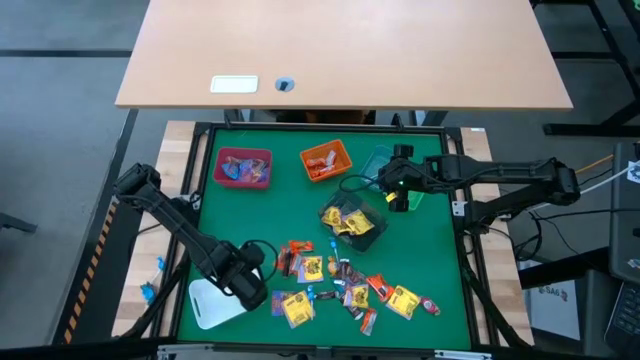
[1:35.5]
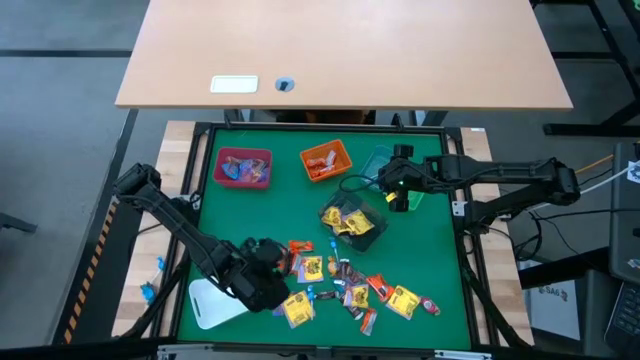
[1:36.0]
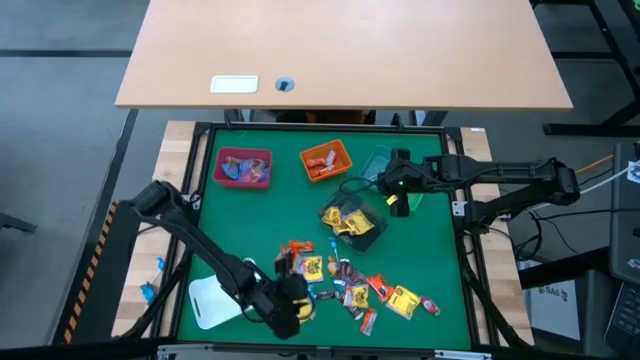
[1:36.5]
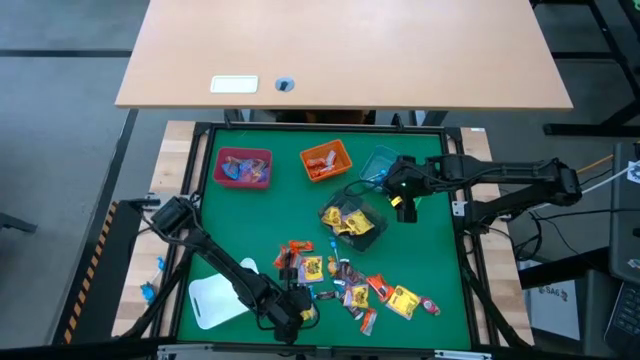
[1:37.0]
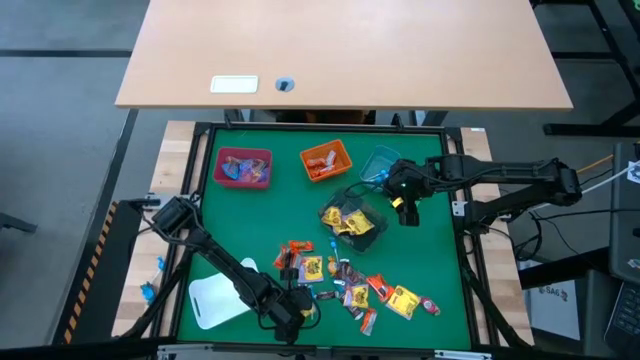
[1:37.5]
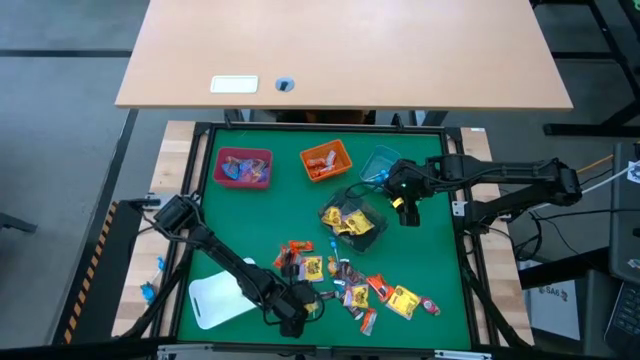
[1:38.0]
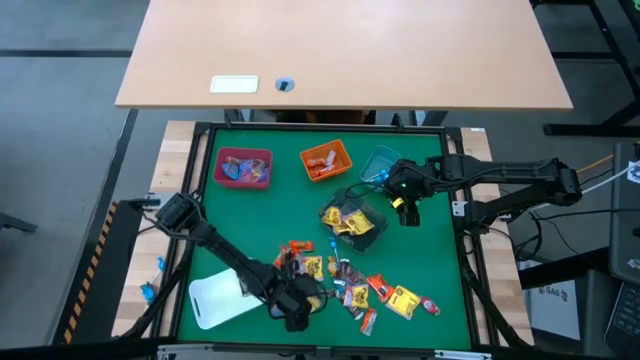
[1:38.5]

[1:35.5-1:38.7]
Task: Sort candy
Put the yellow candy pack into the black bin

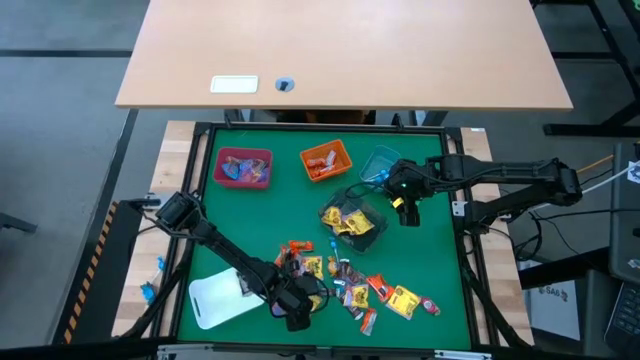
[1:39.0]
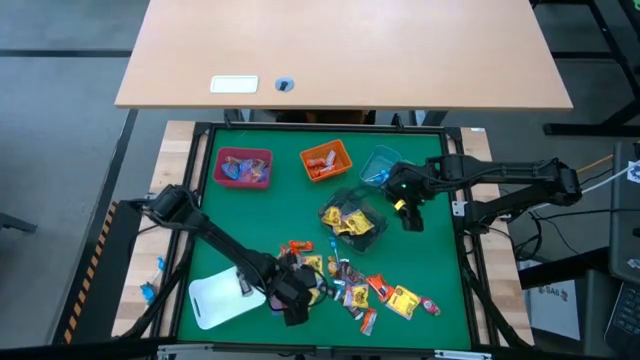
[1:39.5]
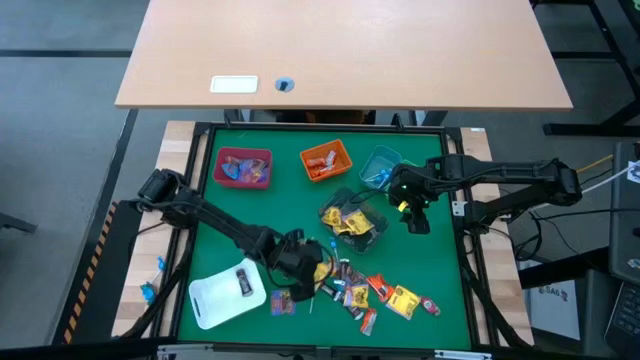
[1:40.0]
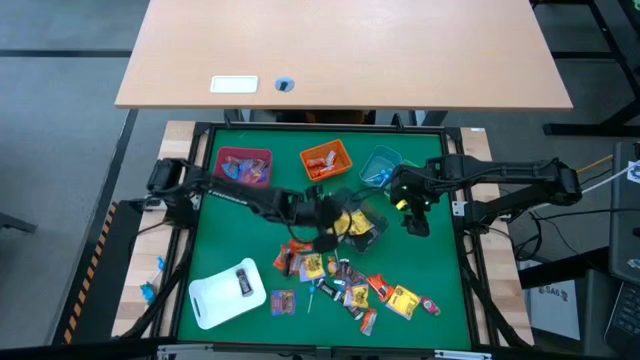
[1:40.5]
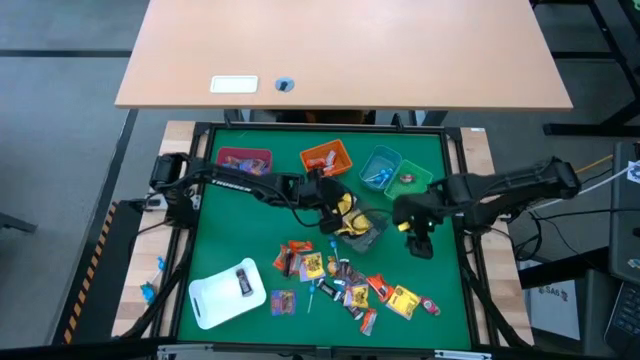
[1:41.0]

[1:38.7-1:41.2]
Put the yellow candy pack into the black bin

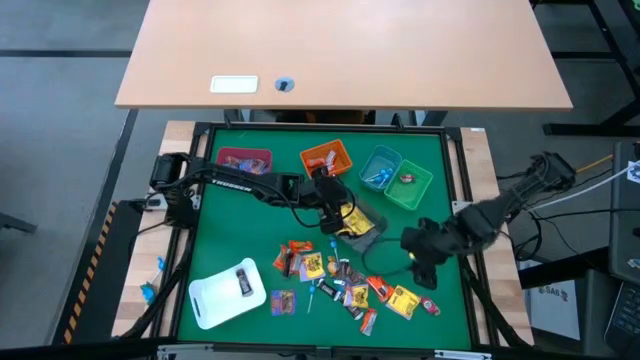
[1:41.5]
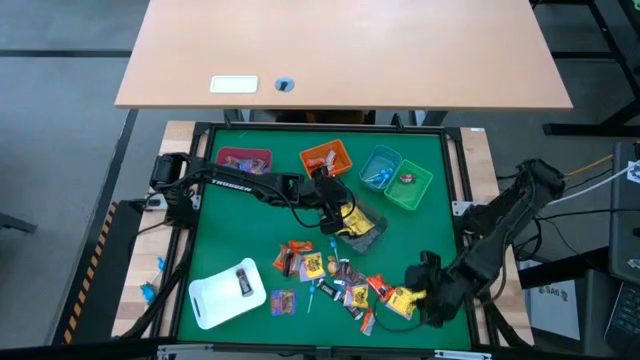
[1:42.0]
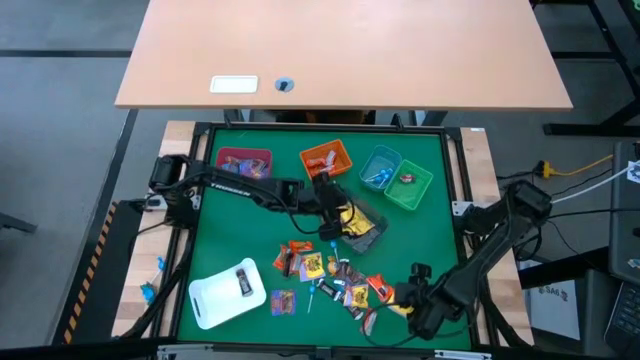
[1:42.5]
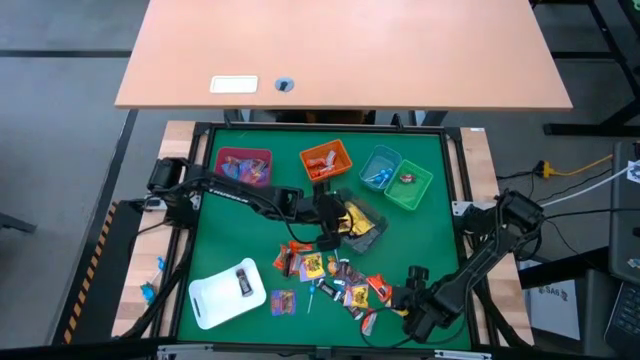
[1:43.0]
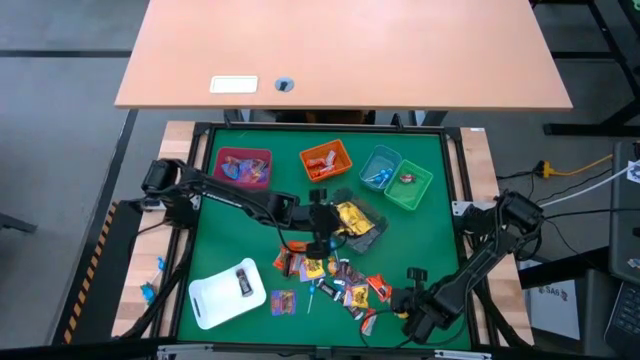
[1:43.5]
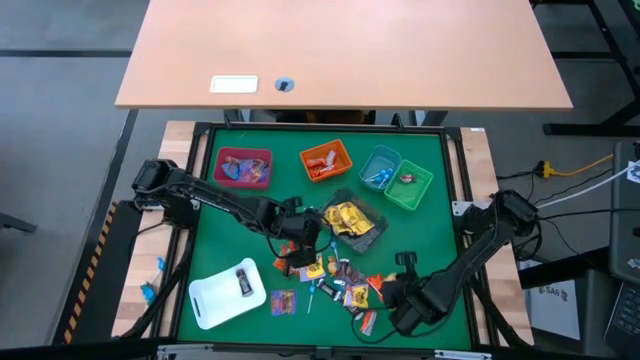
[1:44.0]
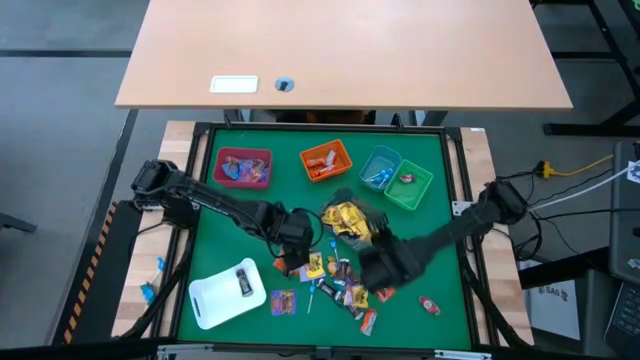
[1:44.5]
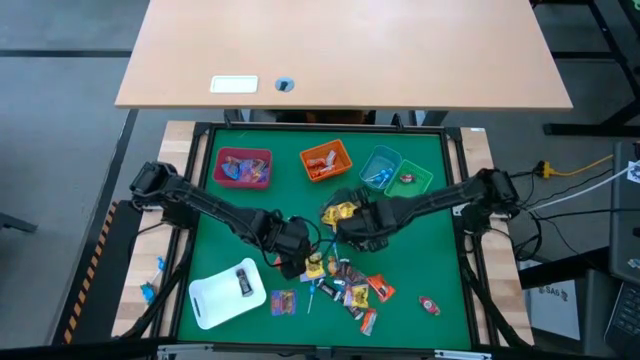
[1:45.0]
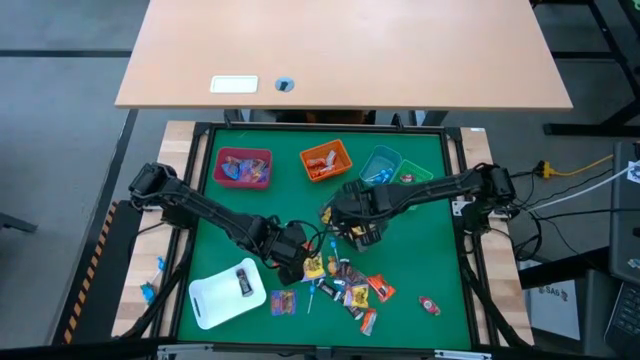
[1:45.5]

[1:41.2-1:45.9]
Put the yellow candy pack into the black bin

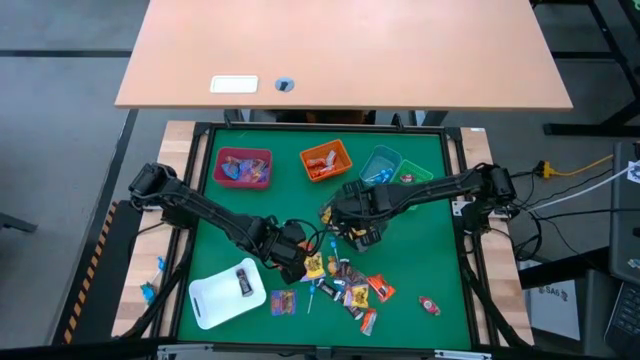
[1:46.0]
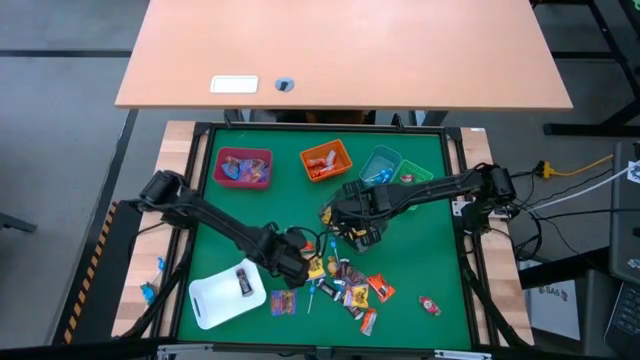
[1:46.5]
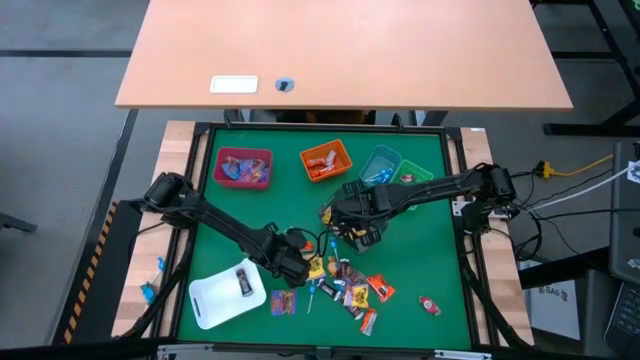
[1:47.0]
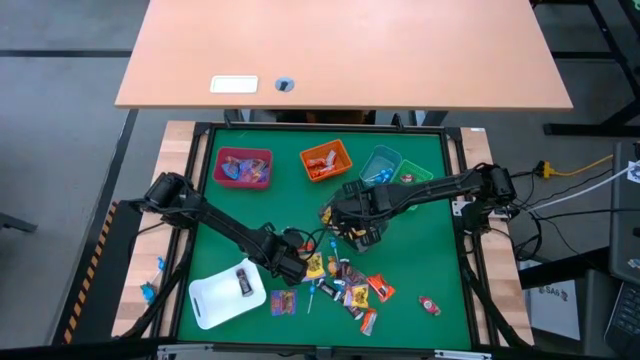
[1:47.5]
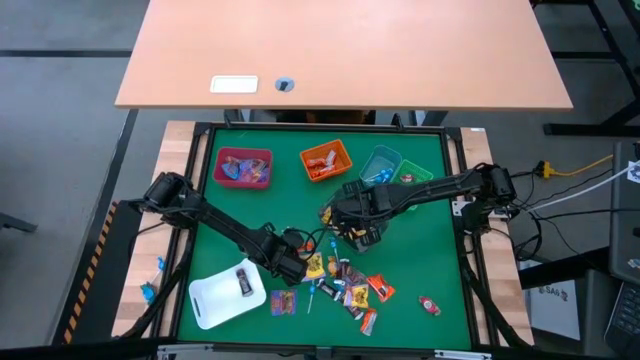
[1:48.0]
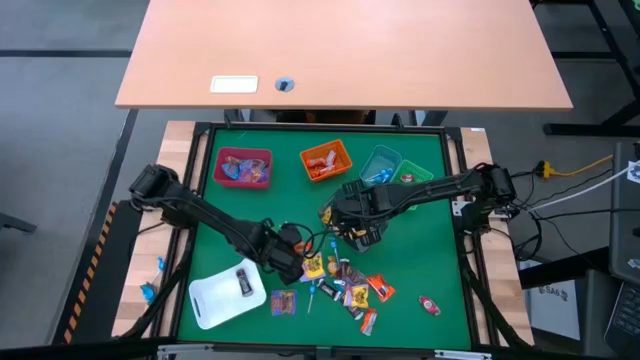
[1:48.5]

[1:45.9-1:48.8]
Put the brown chocolate into the white bin

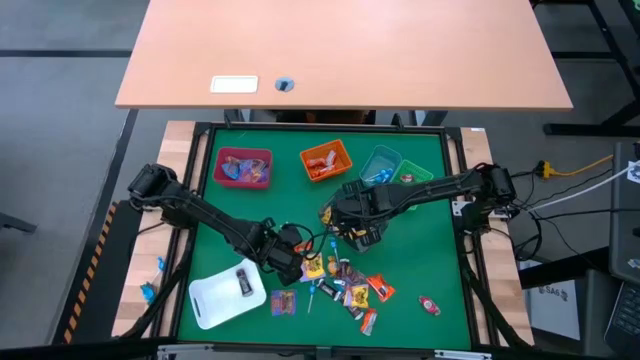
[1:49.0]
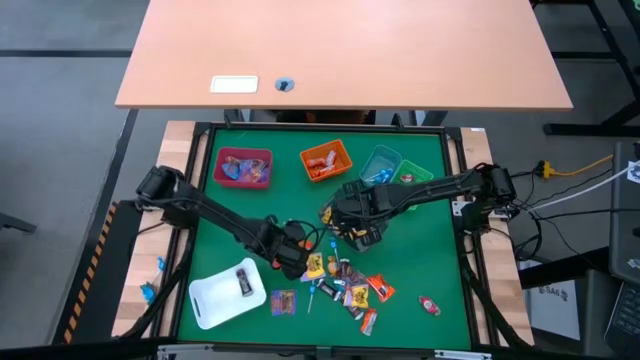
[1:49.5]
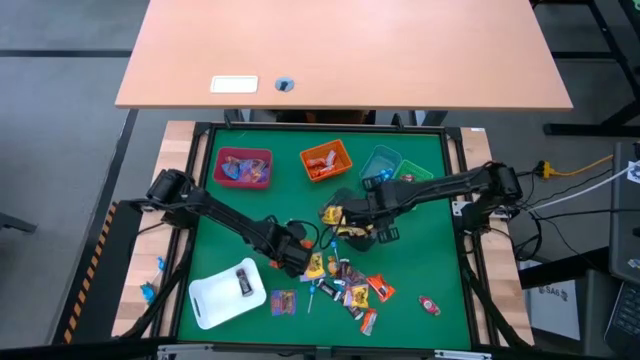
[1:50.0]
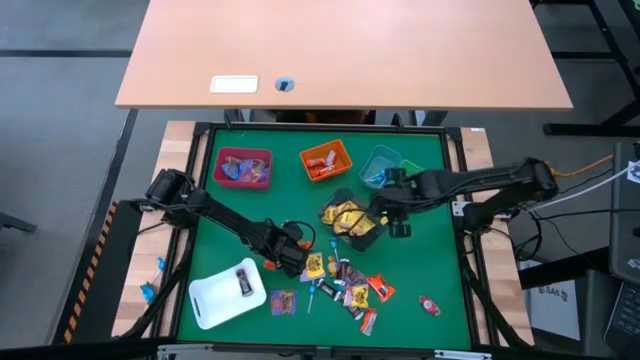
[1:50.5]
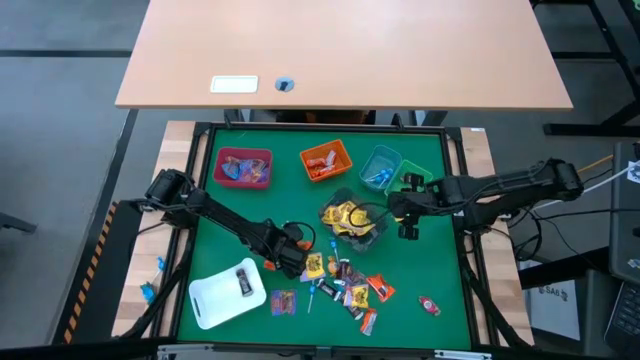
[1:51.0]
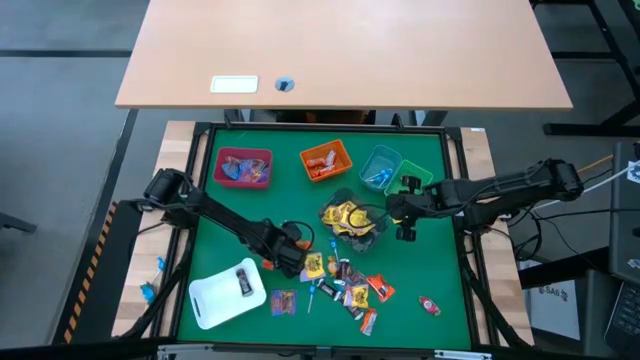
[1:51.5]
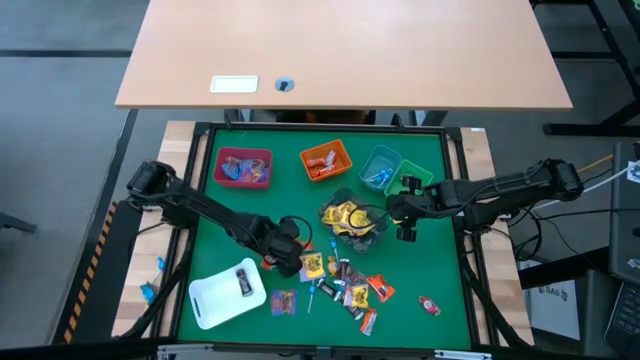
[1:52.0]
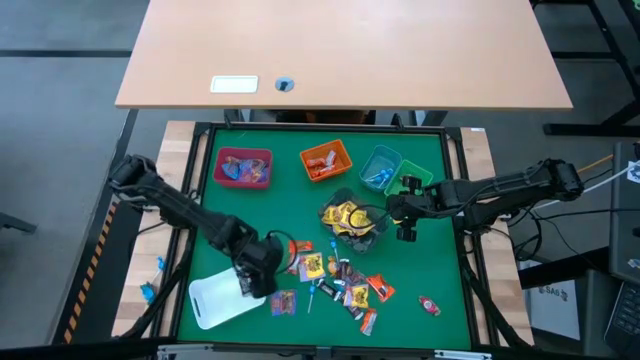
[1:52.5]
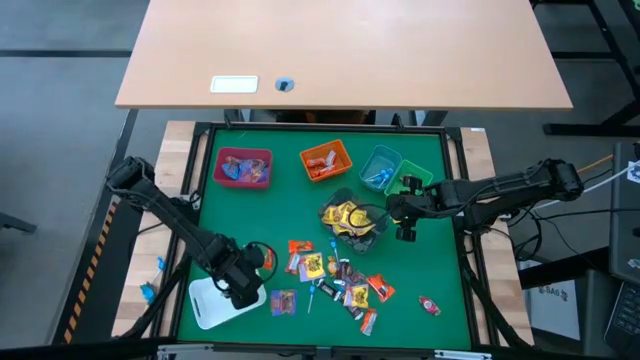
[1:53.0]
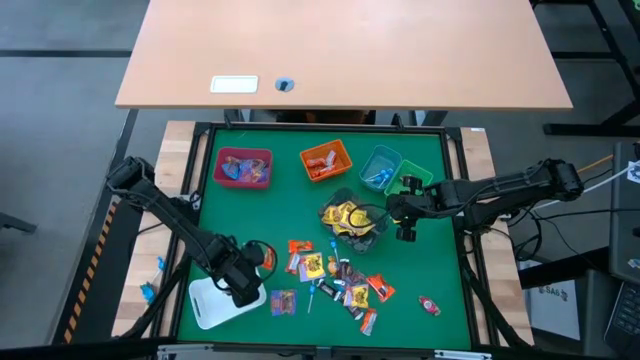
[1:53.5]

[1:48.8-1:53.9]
Put the brown chocolate into the white bin

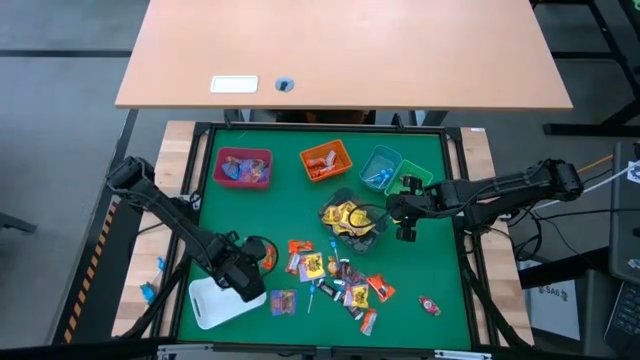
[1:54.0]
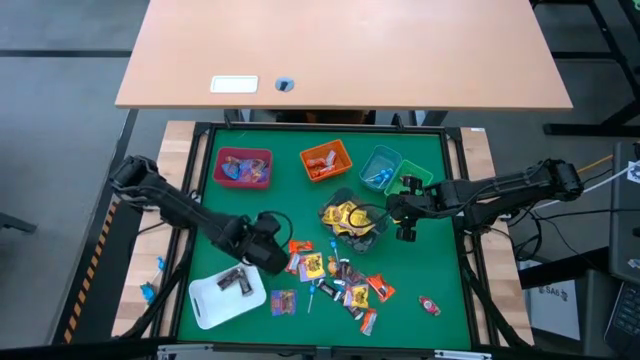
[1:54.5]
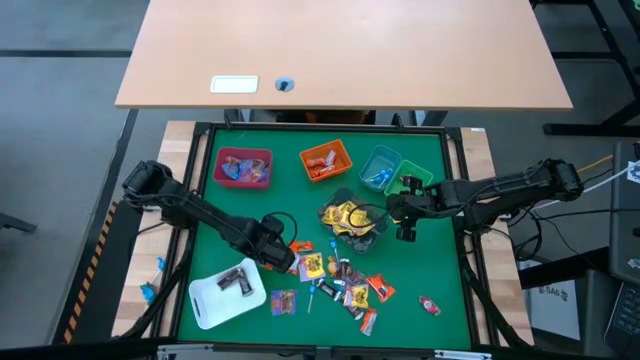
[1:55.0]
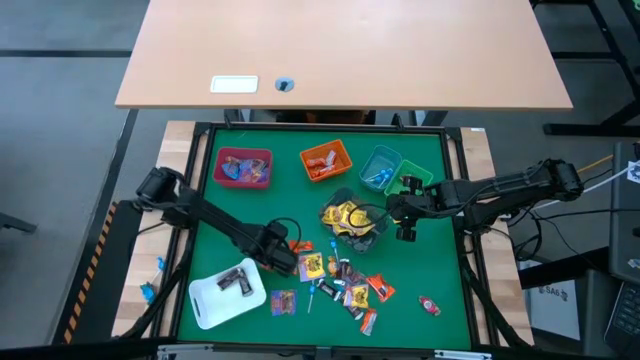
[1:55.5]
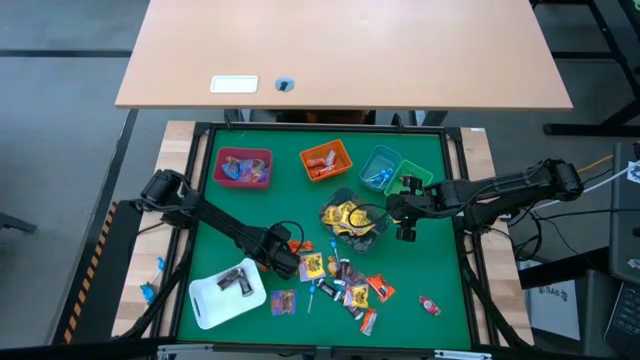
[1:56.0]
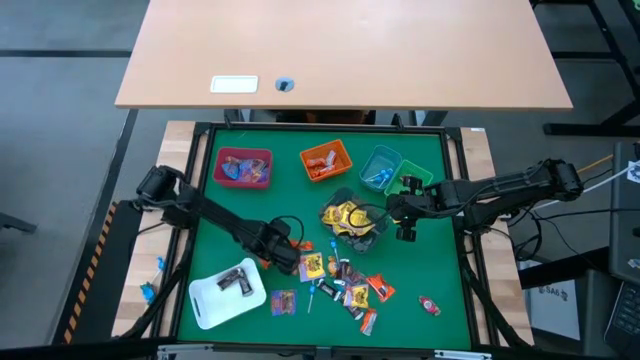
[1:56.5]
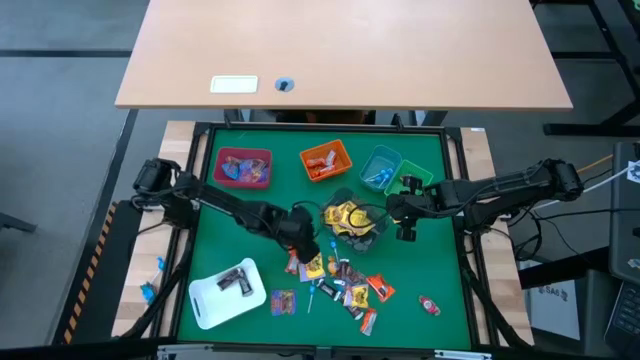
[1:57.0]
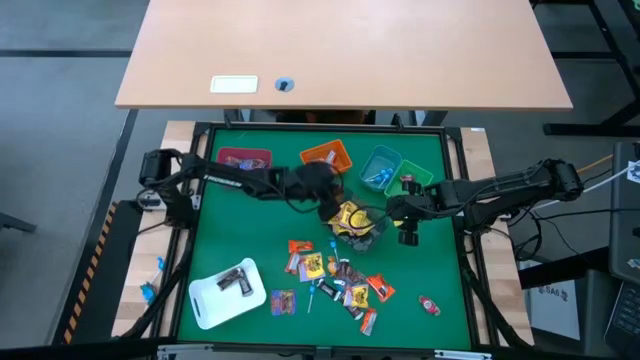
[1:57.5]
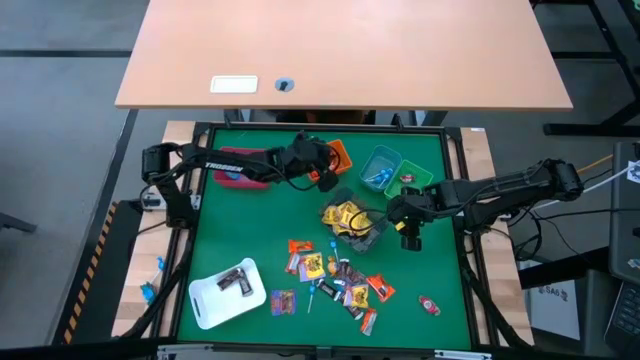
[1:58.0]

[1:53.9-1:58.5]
Put the orange chocolate into the orange bin
